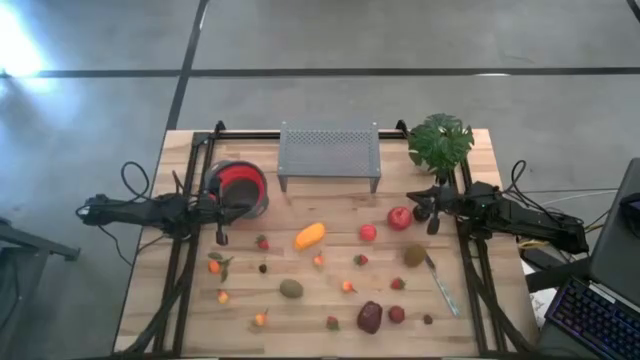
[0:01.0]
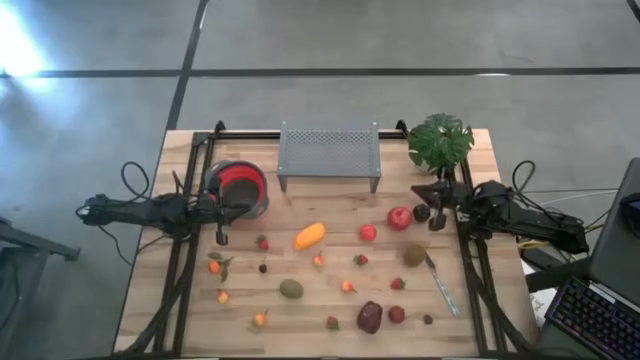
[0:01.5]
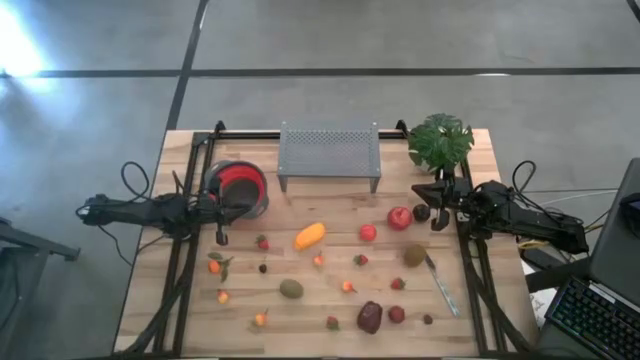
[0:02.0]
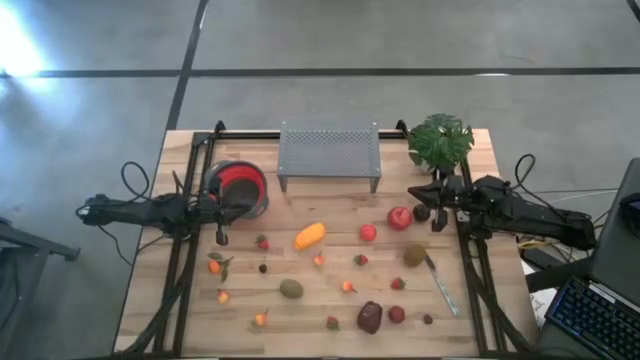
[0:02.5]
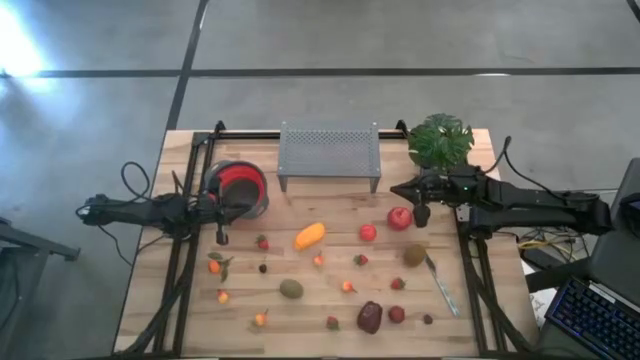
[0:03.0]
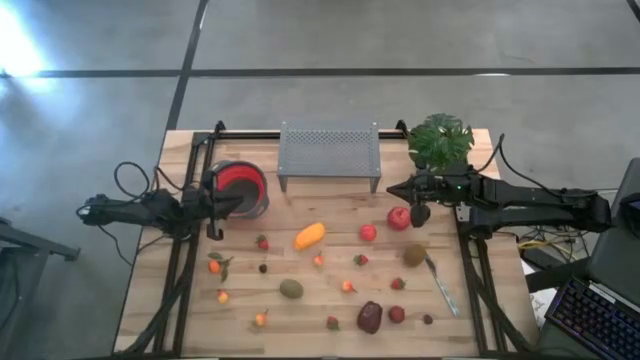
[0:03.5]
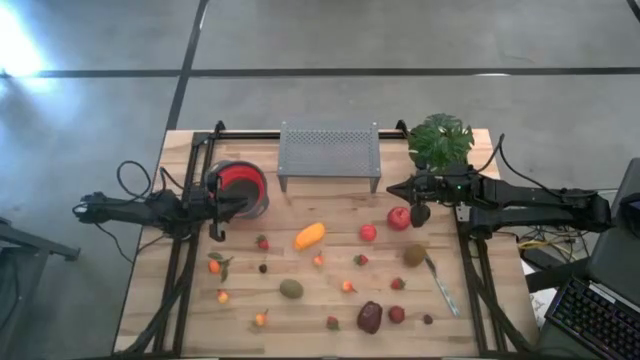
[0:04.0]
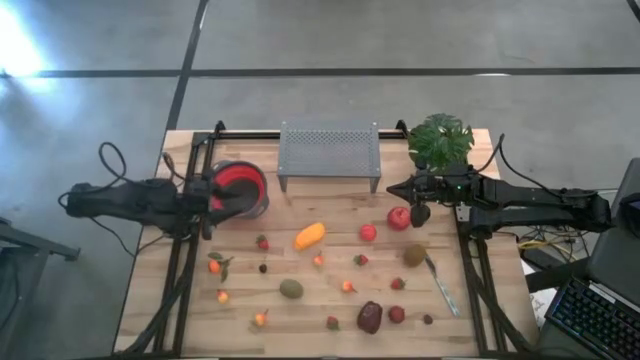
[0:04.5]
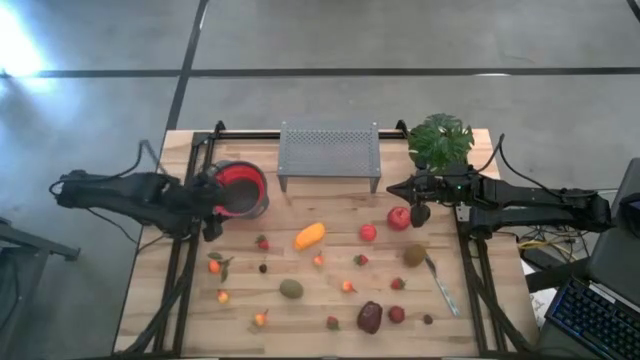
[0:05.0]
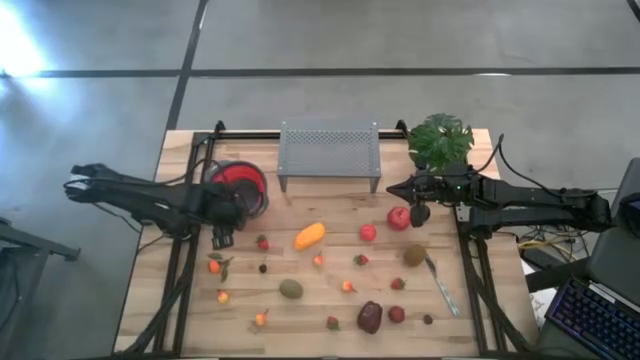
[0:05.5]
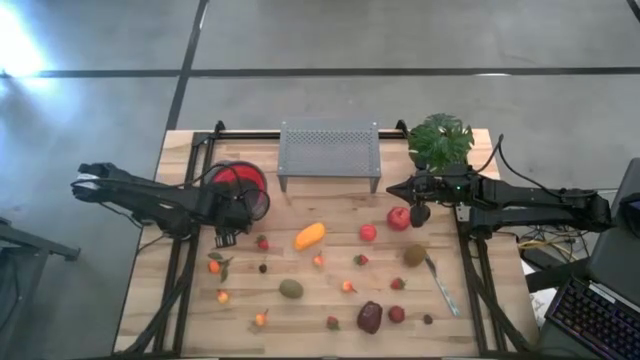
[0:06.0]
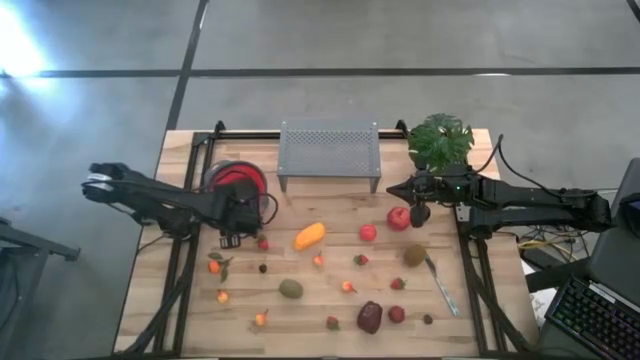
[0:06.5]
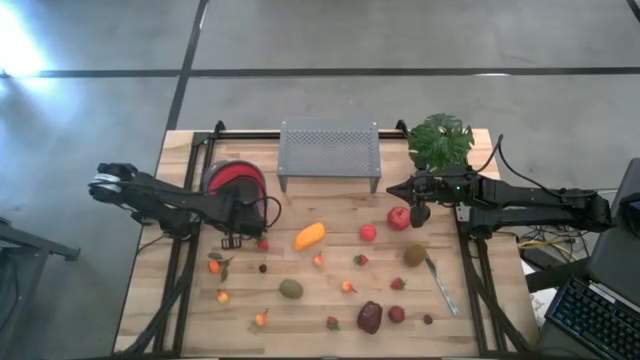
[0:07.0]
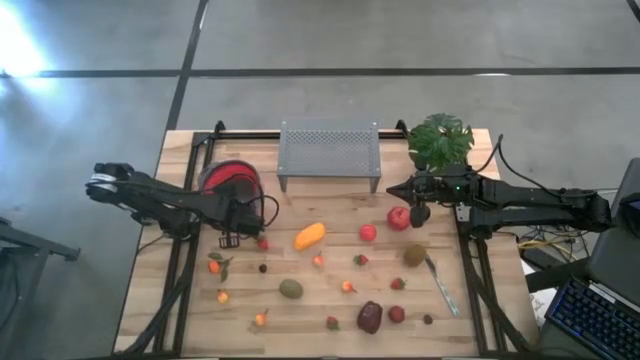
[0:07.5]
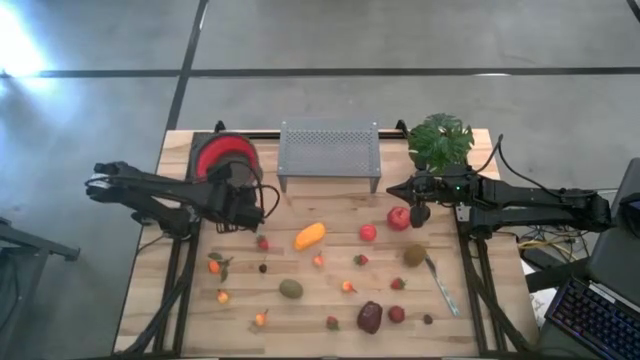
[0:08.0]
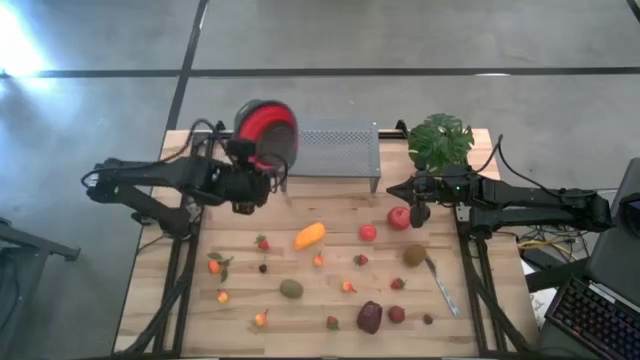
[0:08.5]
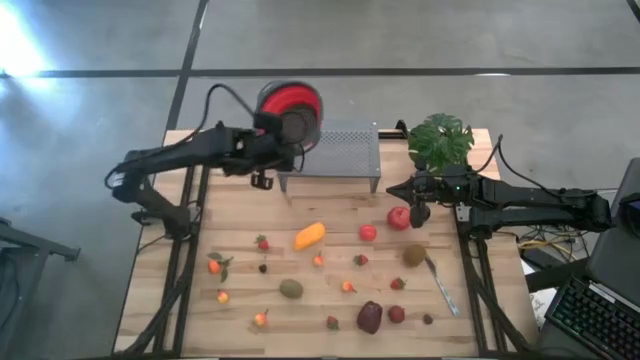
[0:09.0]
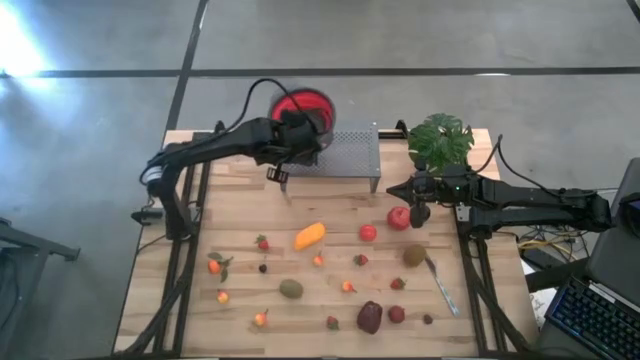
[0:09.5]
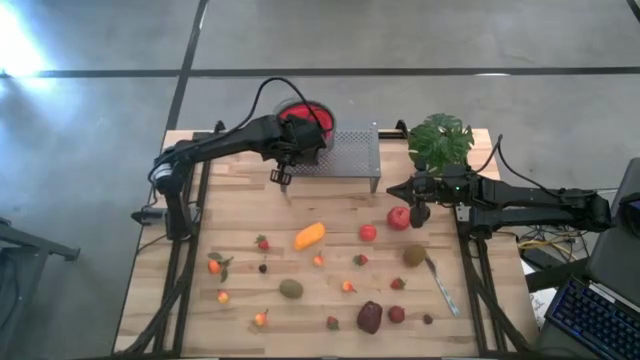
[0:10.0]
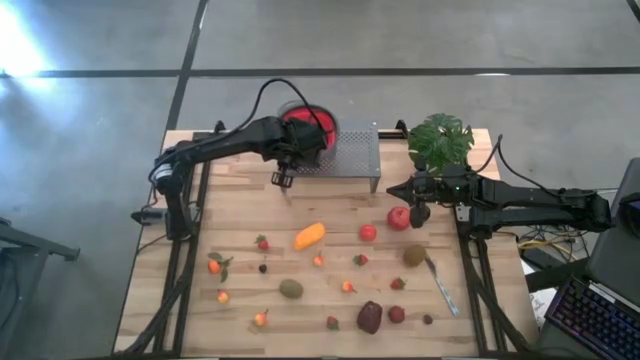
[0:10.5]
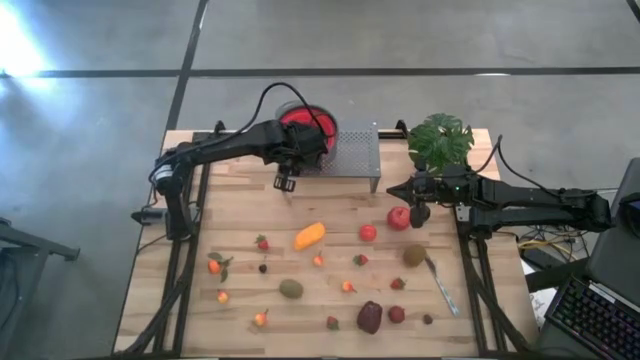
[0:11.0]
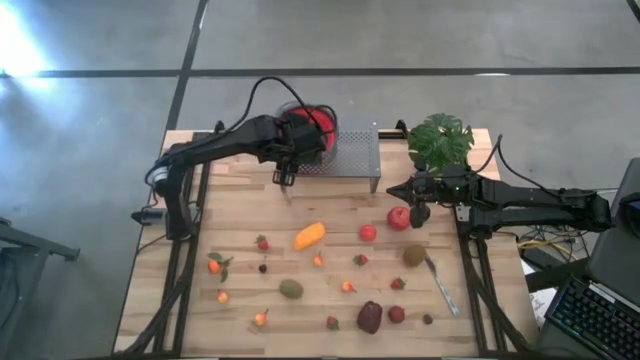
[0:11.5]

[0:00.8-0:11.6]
Task: Pick & Place Fruit
Put the red strainer bowl on the shelf

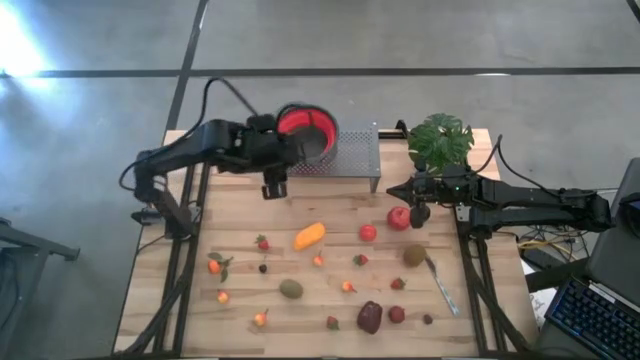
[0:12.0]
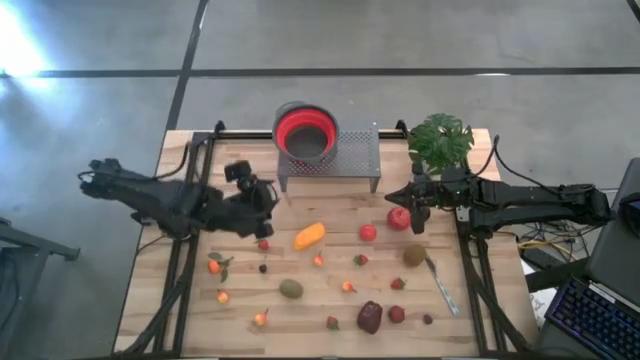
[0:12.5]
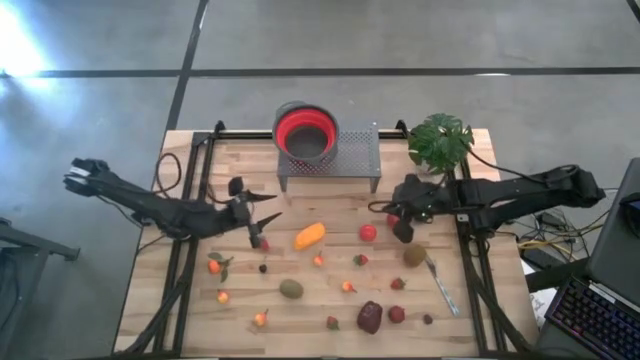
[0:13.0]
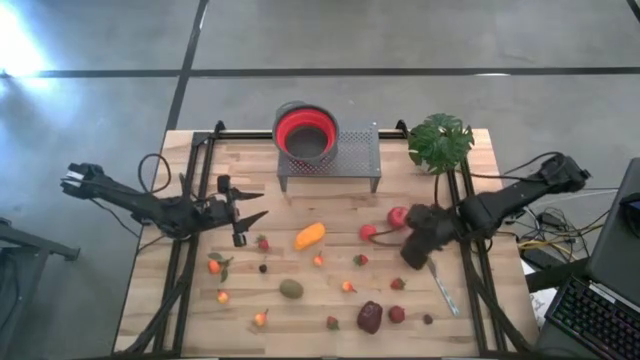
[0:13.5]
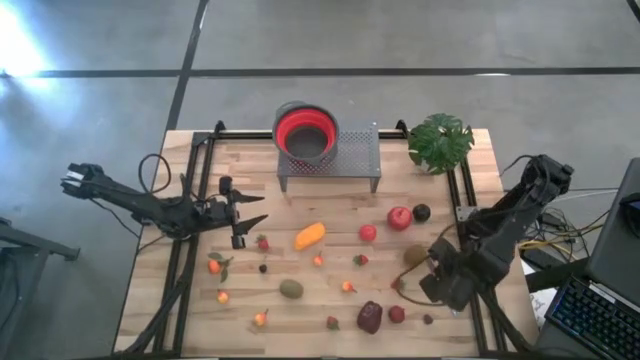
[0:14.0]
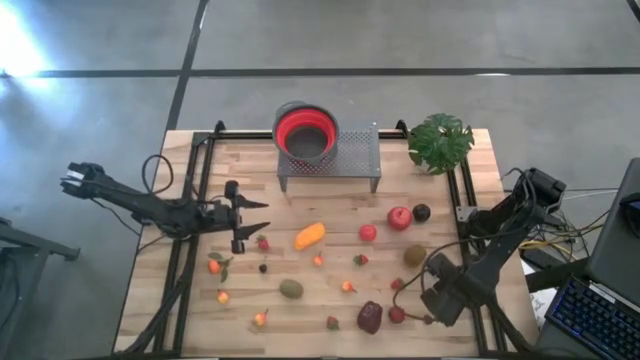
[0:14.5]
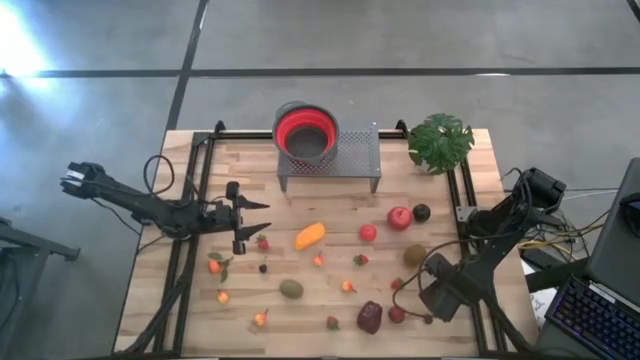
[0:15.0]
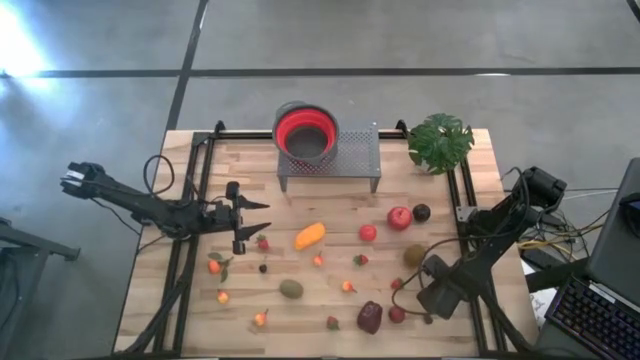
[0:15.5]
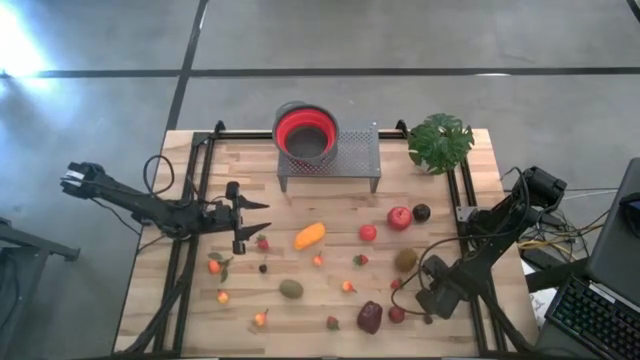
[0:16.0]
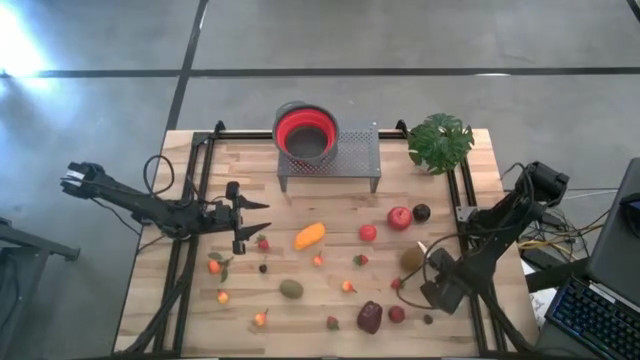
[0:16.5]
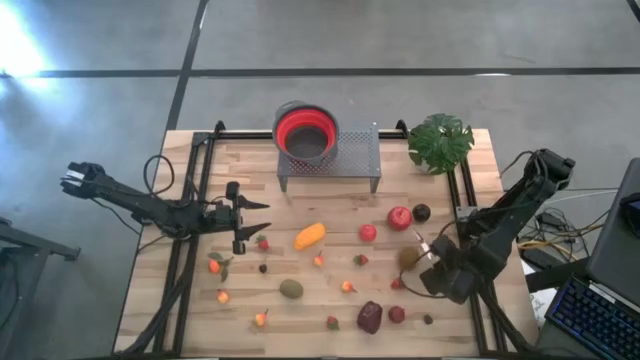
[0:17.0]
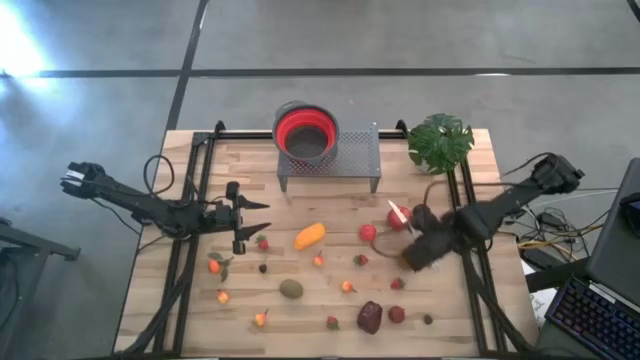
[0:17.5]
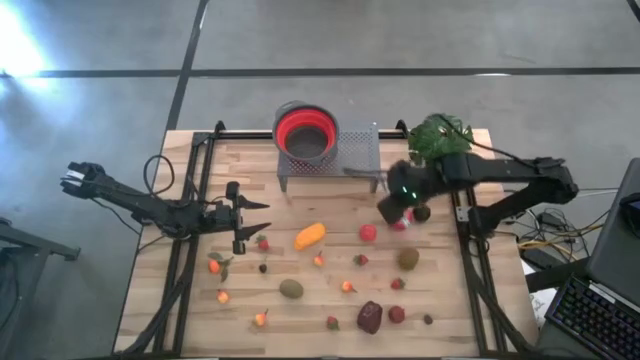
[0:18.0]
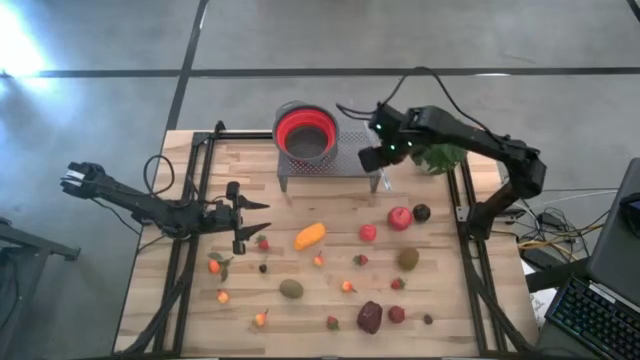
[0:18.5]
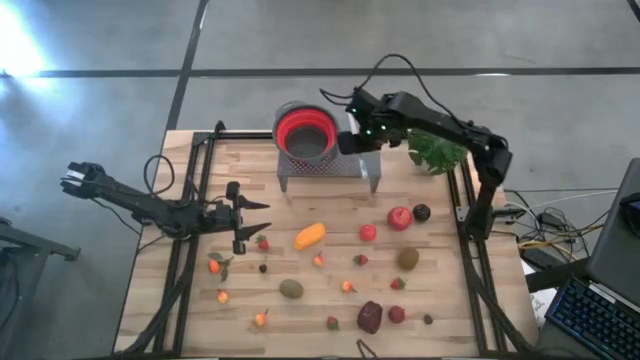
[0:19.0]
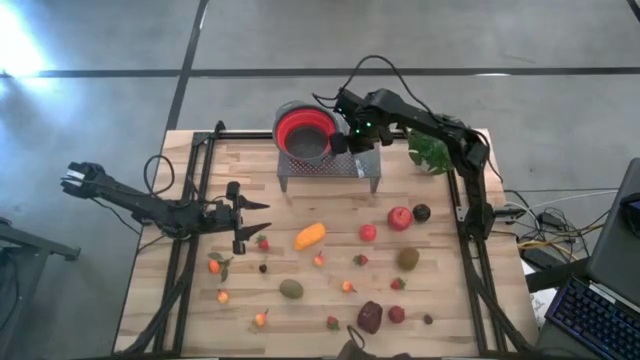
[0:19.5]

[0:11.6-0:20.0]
Put the green pattern knife on the shelf
